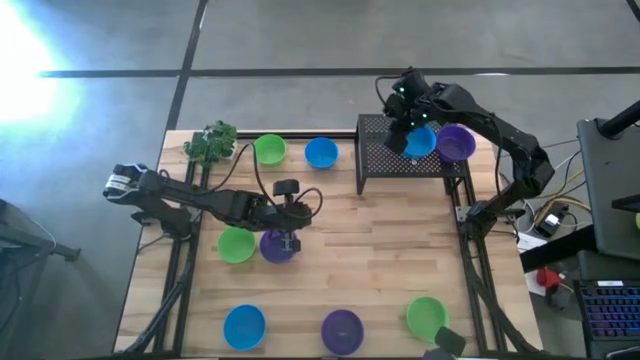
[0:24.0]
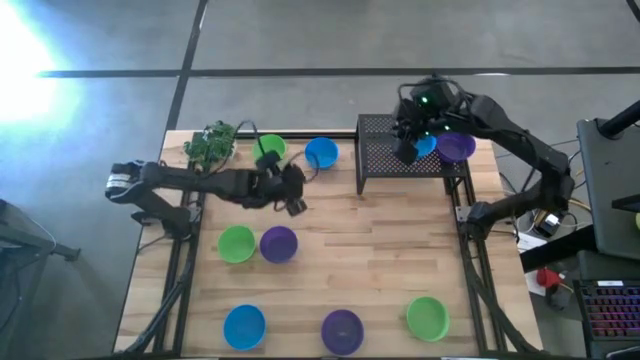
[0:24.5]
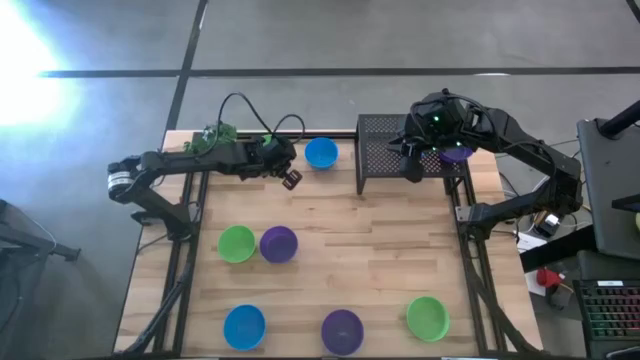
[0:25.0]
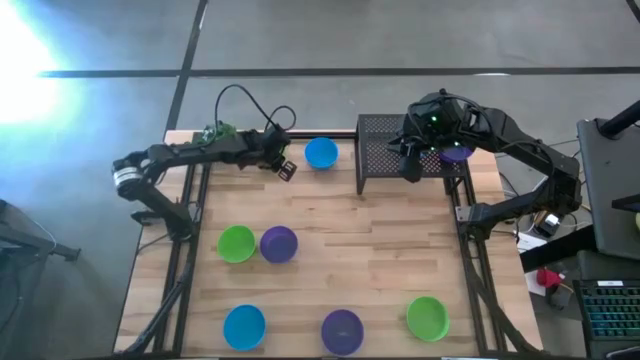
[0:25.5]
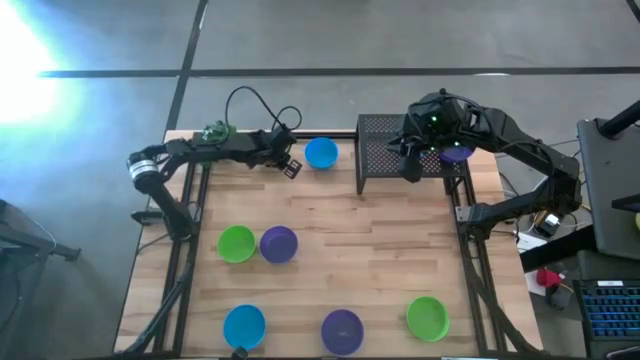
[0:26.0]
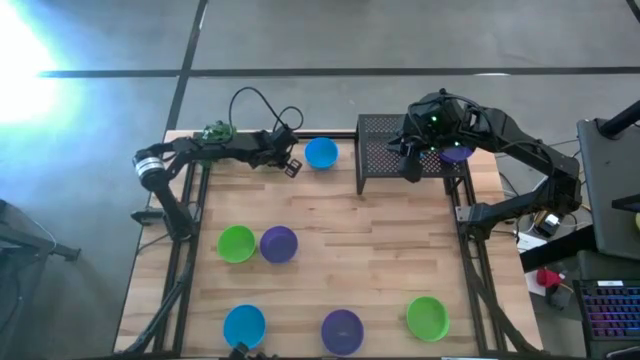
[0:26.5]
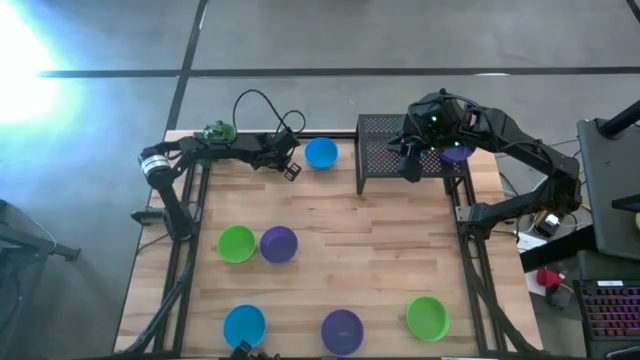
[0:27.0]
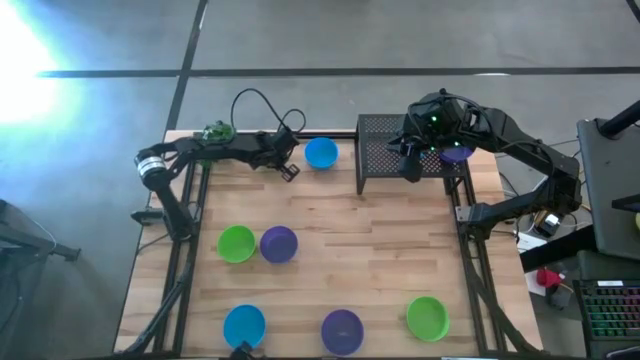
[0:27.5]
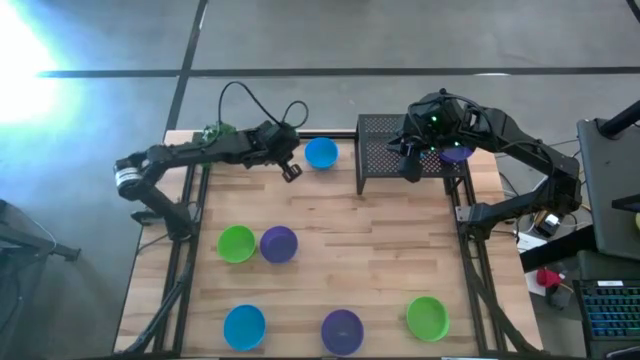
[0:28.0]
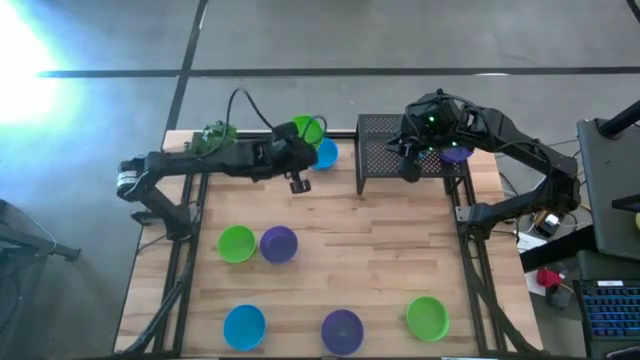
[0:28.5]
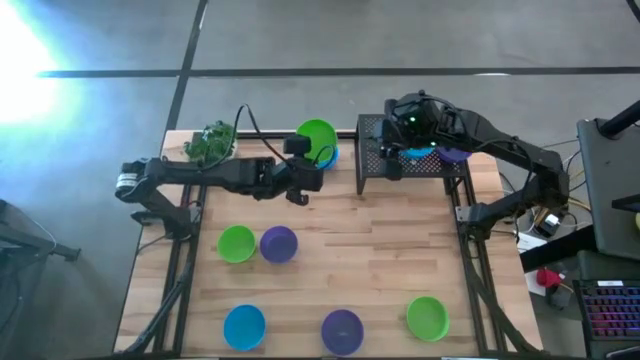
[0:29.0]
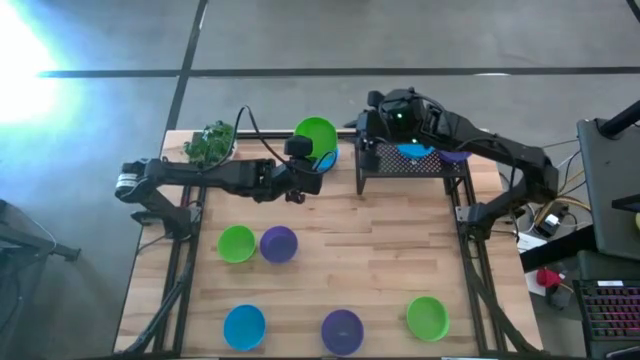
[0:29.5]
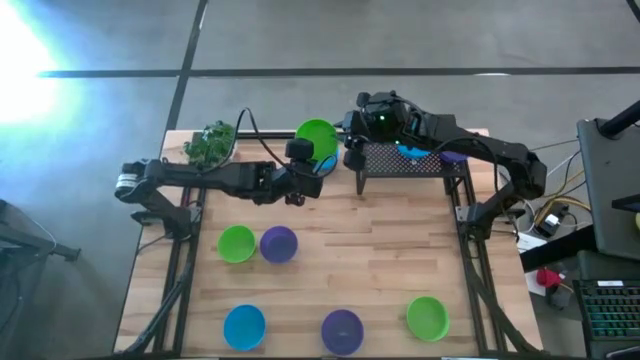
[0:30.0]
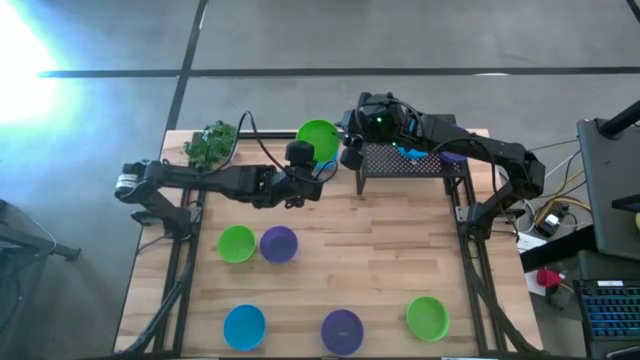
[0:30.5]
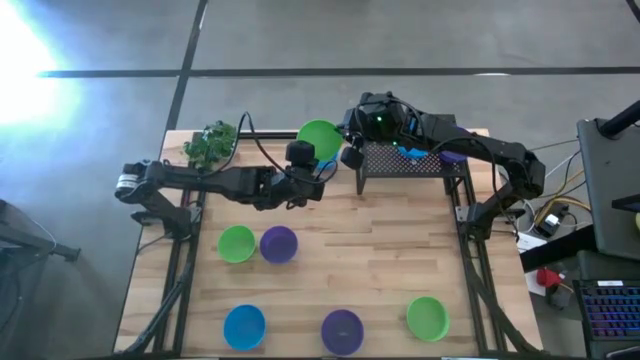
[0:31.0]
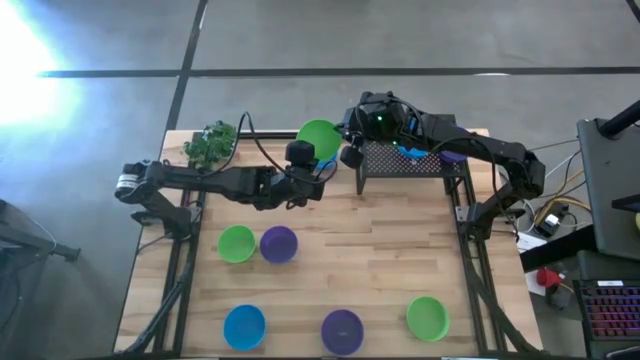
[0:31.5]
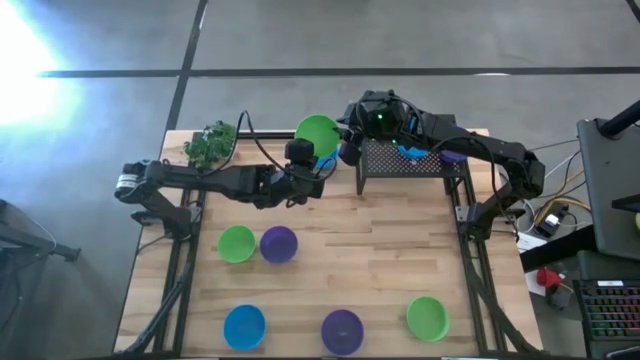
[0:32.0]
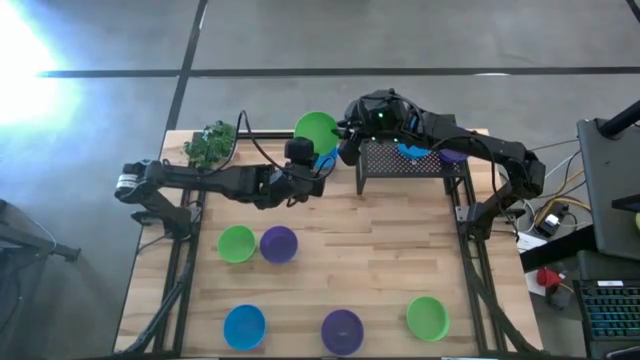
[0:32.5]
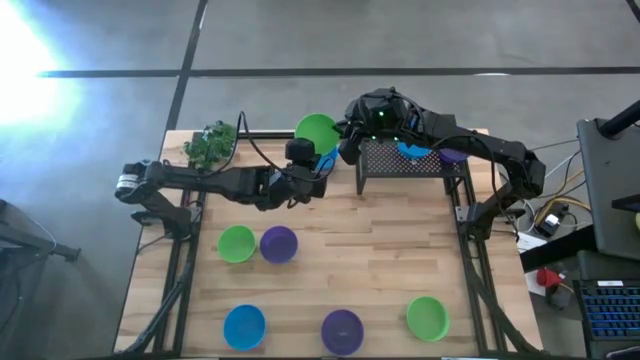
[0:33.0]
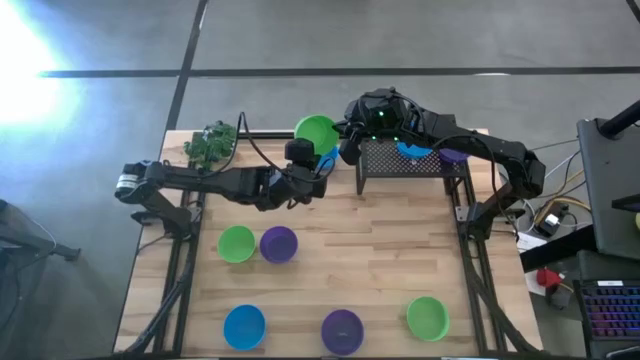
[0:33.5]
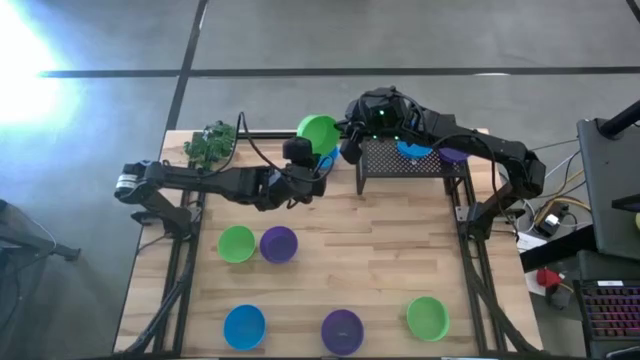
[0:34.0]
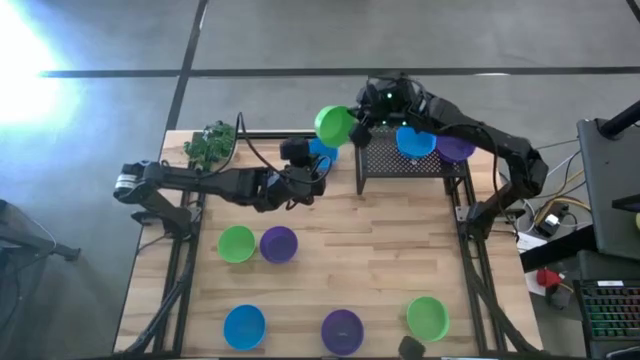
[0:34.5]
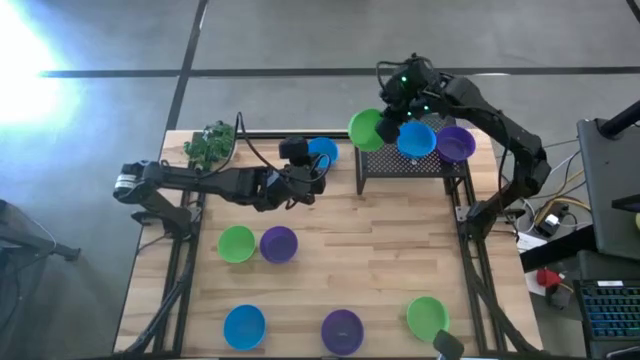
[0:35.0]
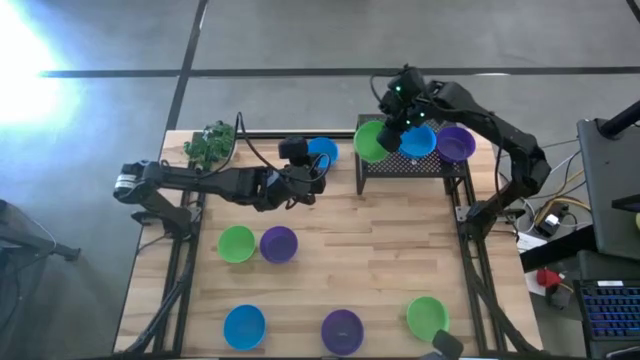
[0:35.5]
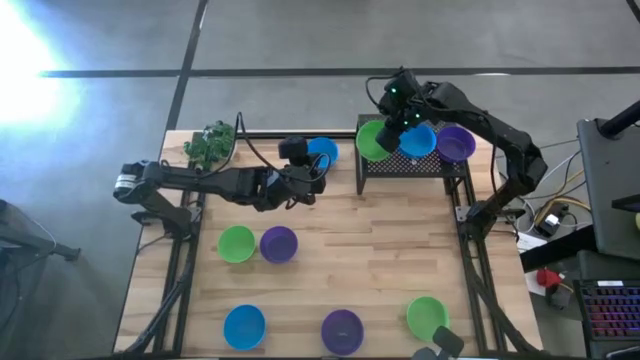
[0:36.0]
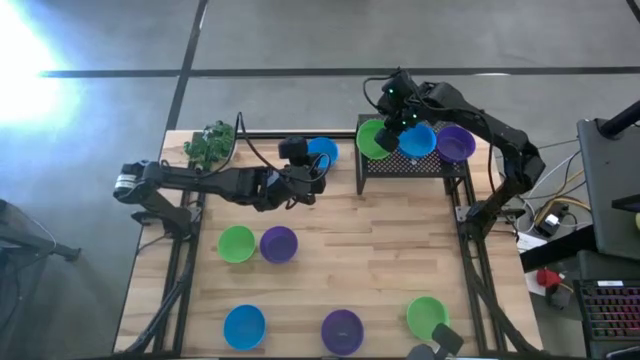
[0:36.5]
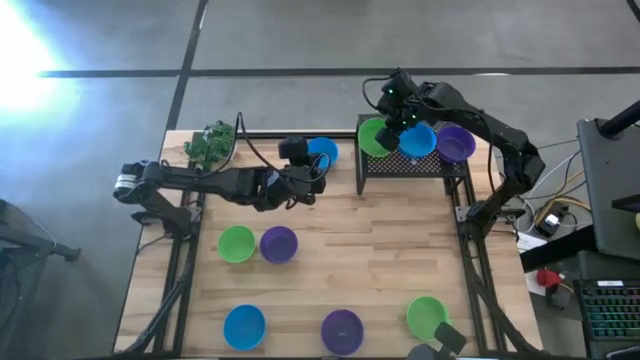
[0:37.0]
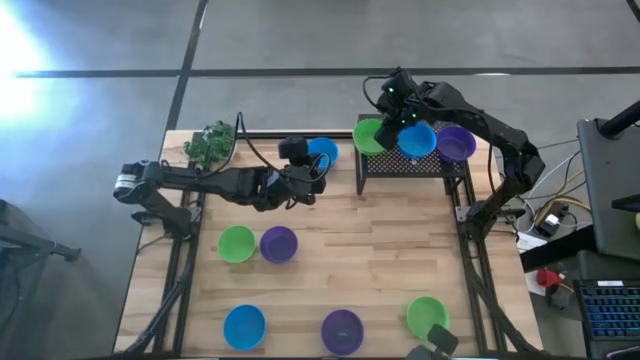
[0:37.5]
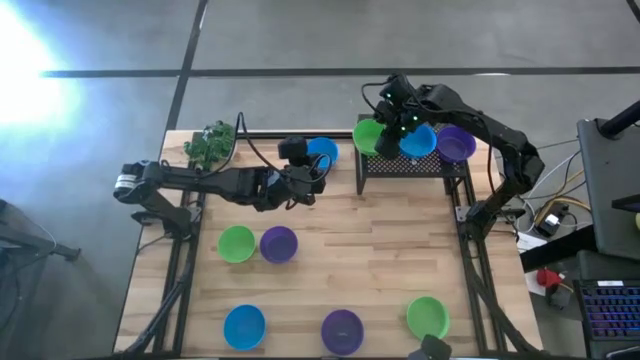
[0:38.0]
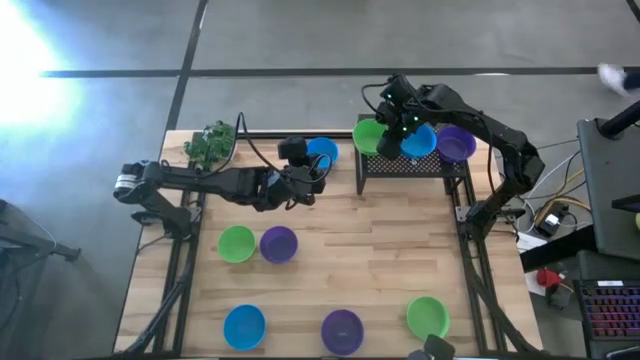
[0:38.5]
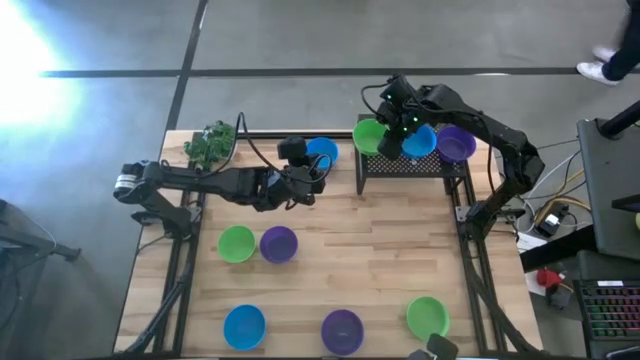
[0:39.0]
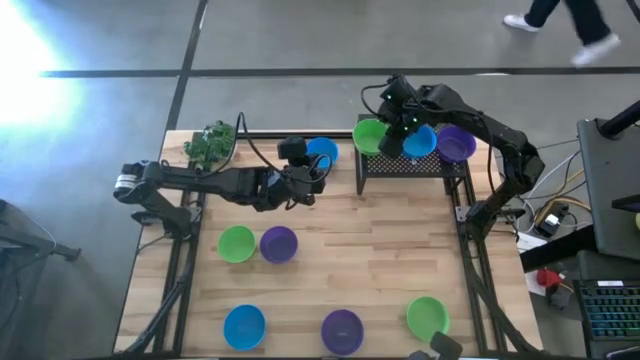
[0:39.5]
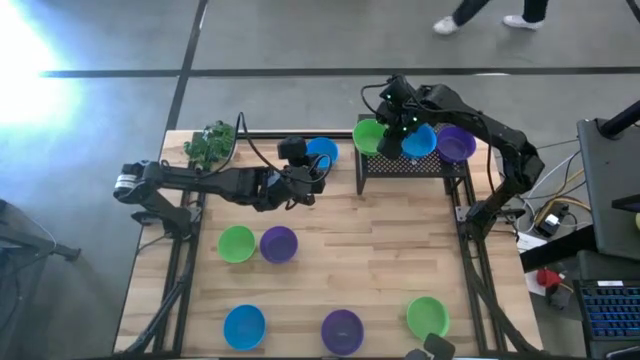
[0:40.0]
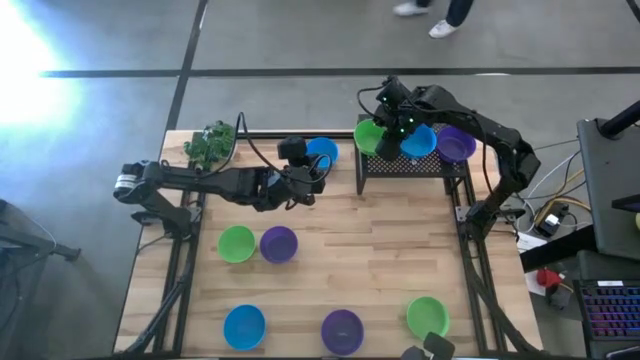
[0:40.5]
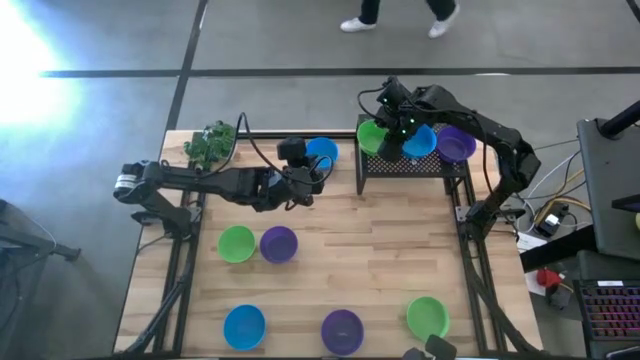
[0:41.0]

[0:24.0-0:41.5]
Task: Pick & Place Mini bowls
Put the top green bowl on the shelf

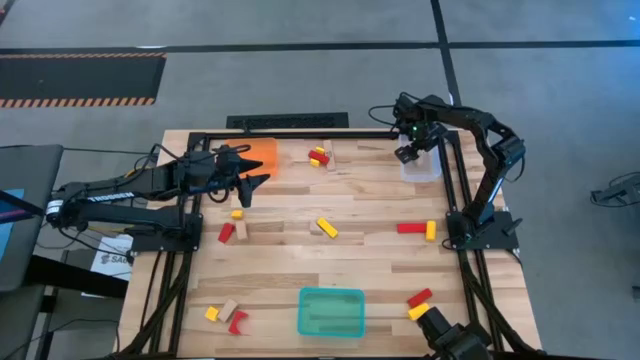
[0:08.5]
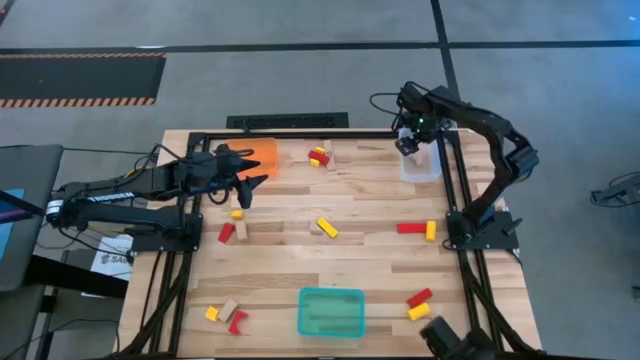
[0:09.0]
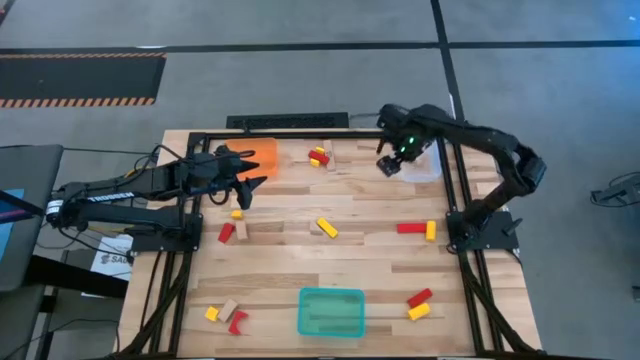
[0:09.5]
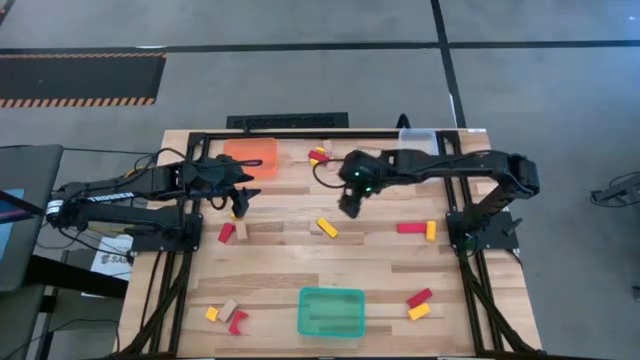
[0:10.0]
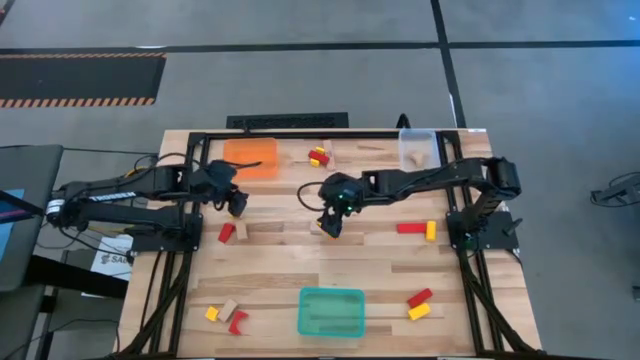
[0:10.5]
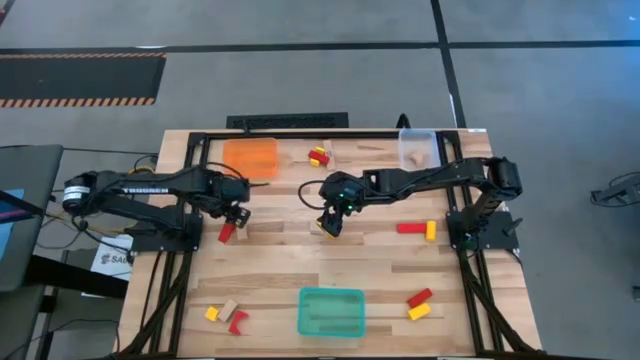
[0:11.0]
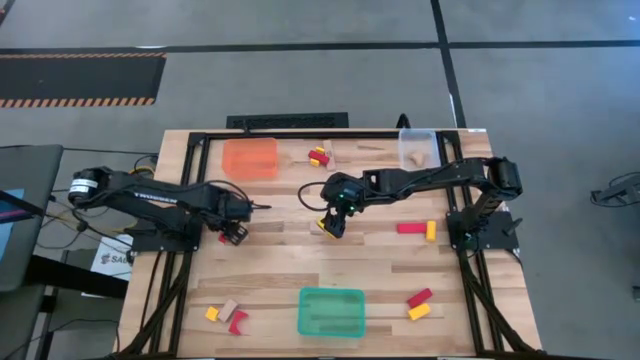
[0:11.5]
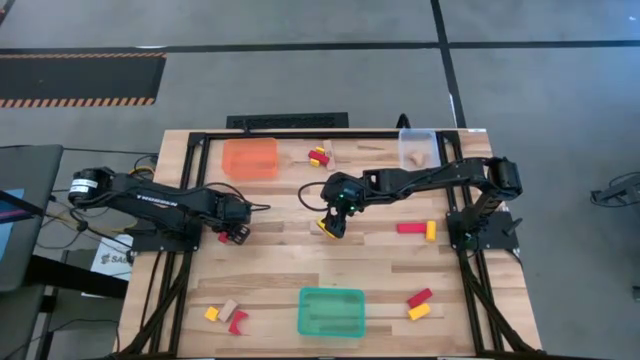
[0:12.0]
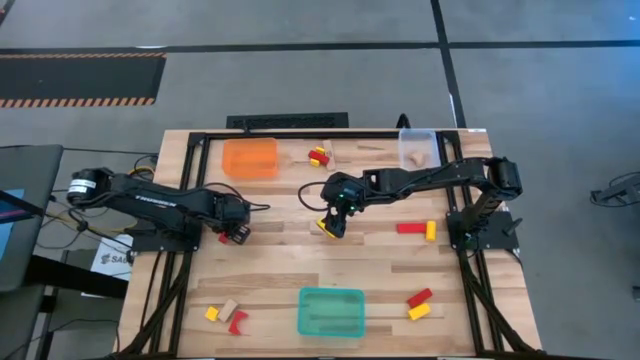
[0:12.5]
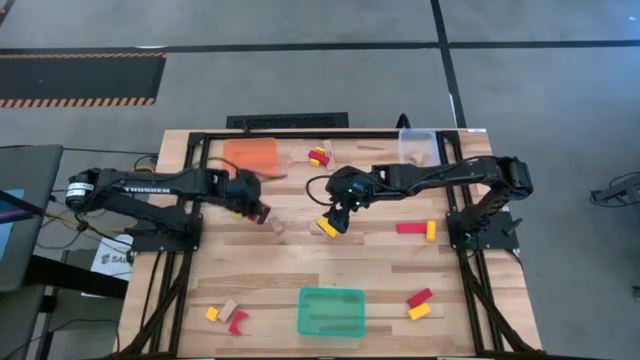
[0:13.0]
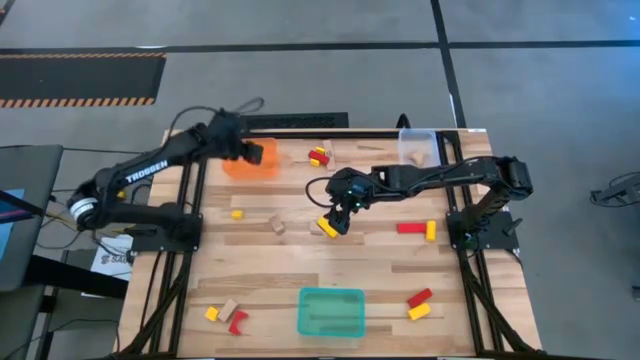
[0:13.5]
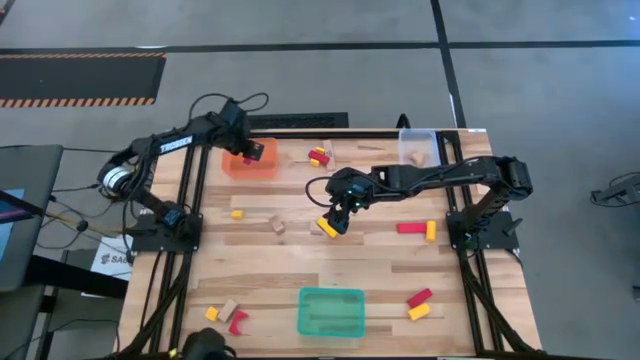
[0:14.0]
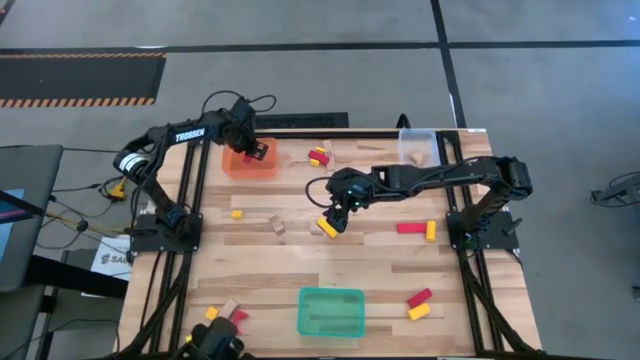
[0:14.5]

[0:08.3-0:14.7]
Task: Sort & place blocks by color
Put the red block into the orange bin
